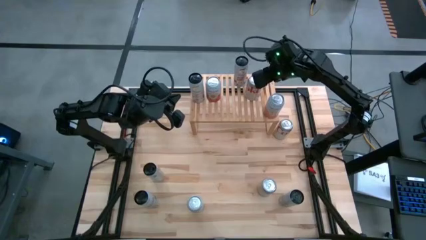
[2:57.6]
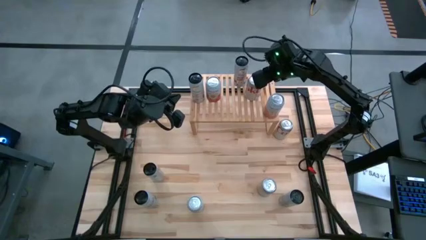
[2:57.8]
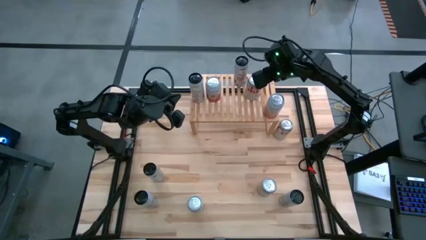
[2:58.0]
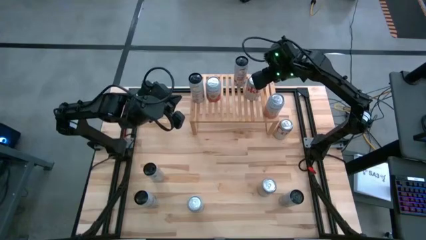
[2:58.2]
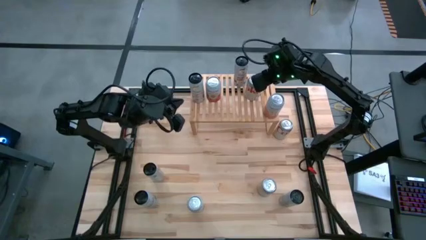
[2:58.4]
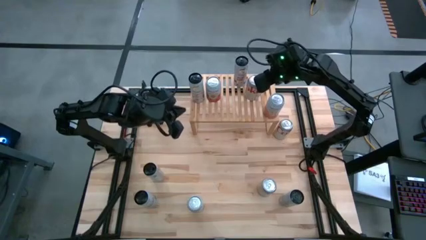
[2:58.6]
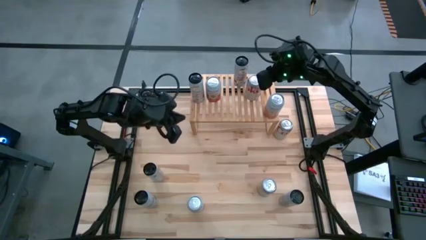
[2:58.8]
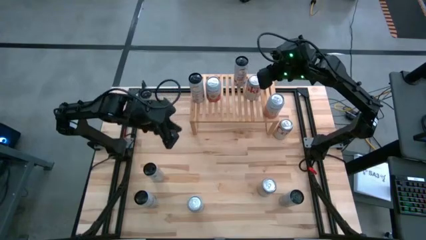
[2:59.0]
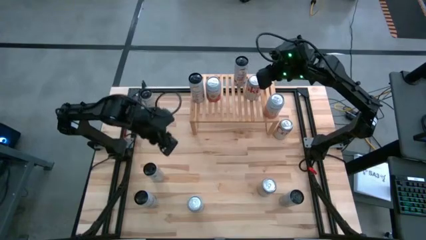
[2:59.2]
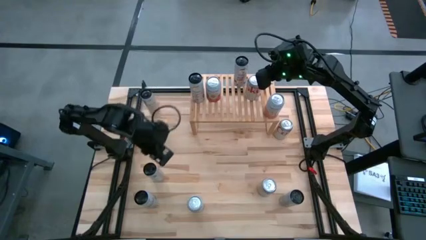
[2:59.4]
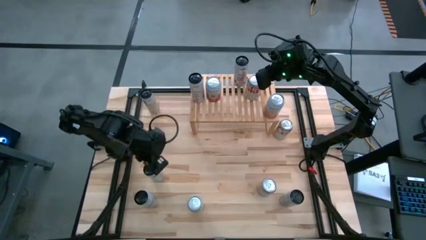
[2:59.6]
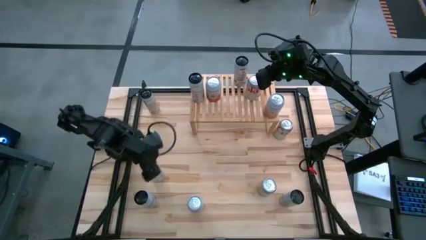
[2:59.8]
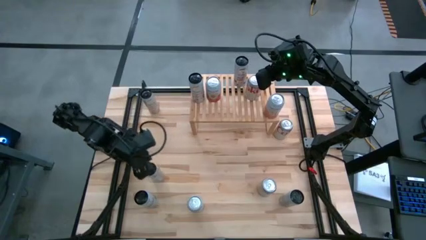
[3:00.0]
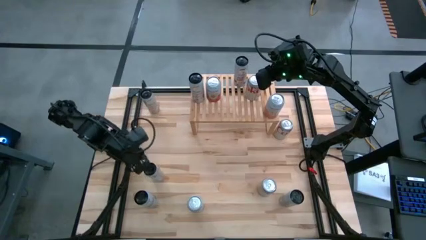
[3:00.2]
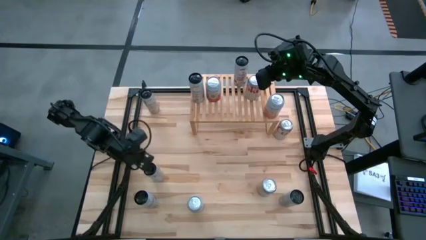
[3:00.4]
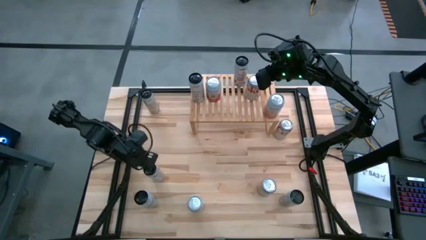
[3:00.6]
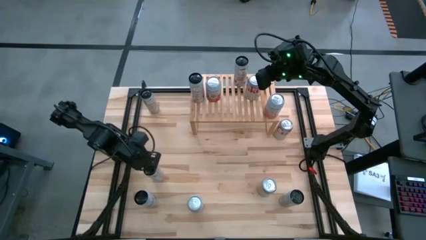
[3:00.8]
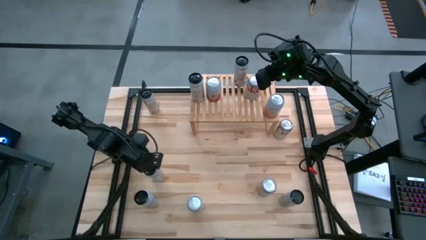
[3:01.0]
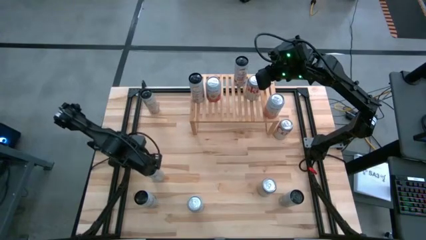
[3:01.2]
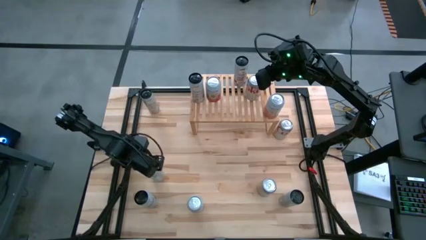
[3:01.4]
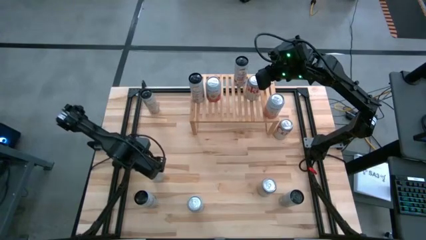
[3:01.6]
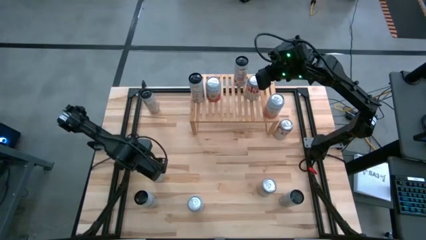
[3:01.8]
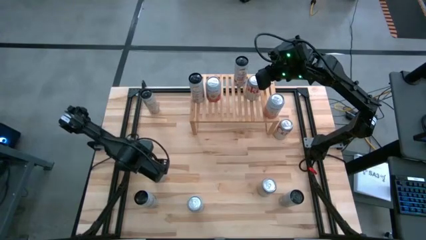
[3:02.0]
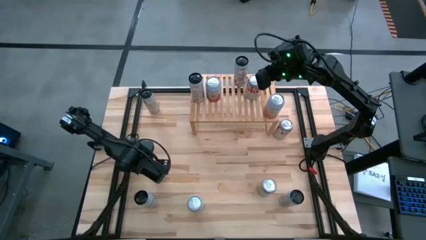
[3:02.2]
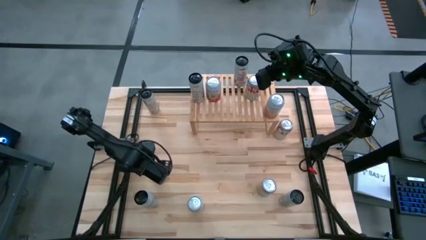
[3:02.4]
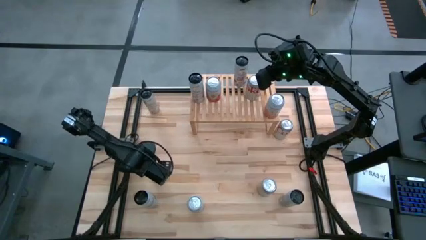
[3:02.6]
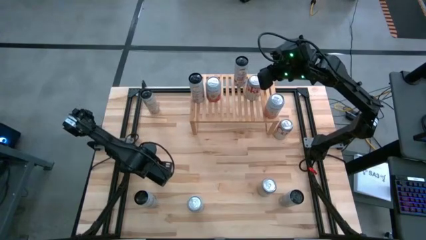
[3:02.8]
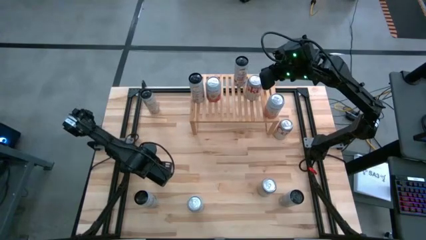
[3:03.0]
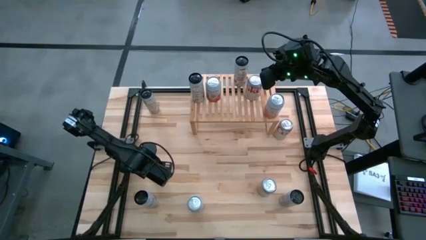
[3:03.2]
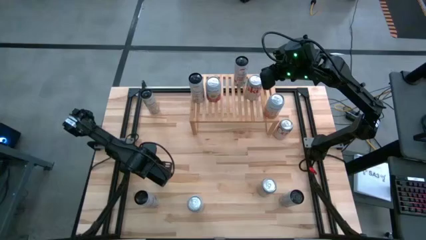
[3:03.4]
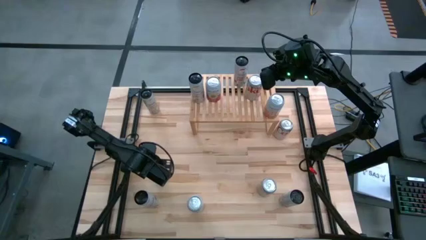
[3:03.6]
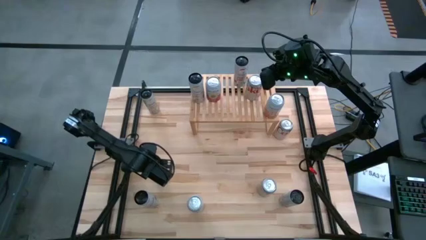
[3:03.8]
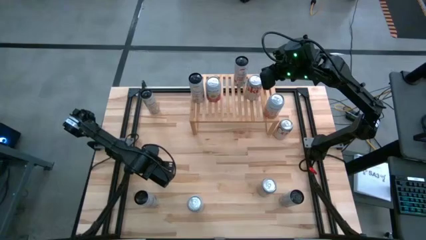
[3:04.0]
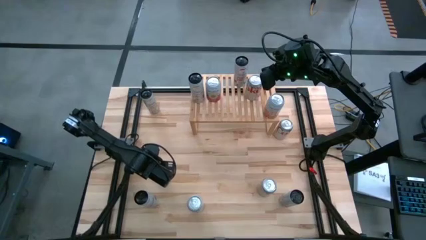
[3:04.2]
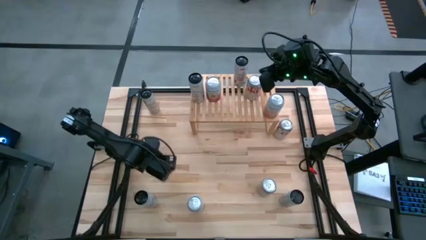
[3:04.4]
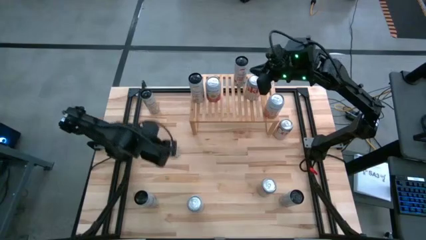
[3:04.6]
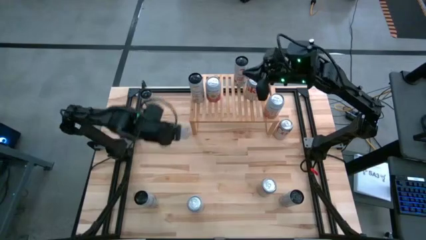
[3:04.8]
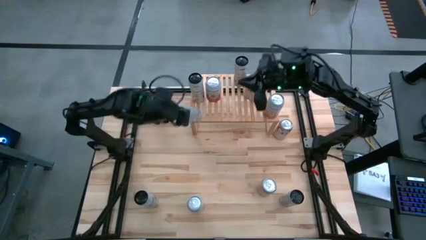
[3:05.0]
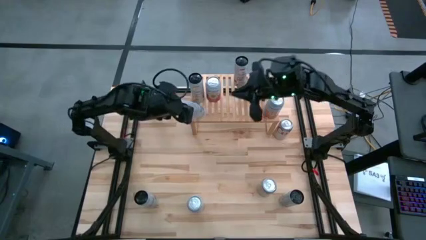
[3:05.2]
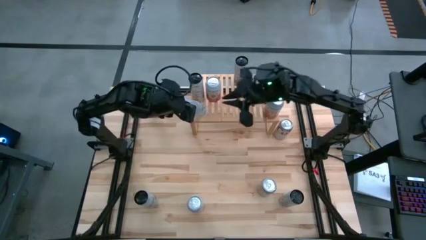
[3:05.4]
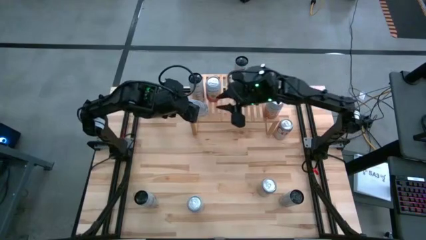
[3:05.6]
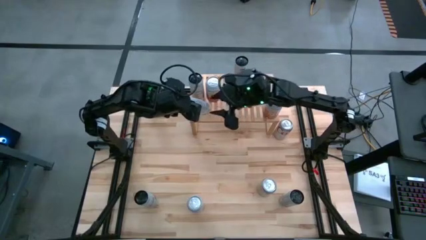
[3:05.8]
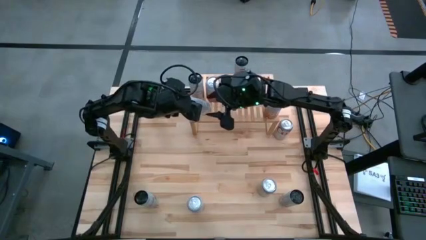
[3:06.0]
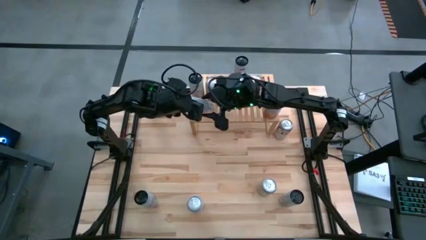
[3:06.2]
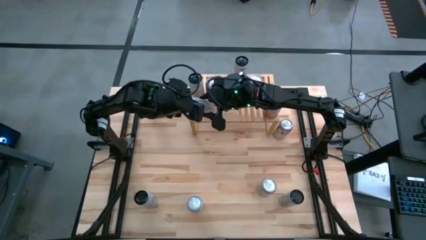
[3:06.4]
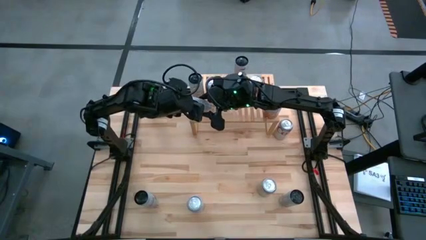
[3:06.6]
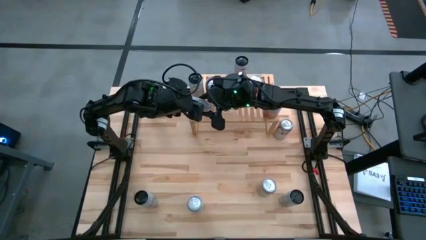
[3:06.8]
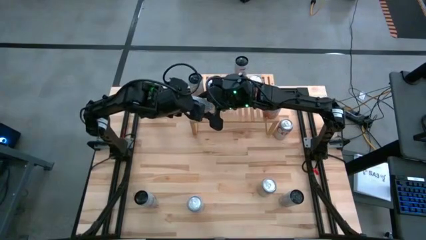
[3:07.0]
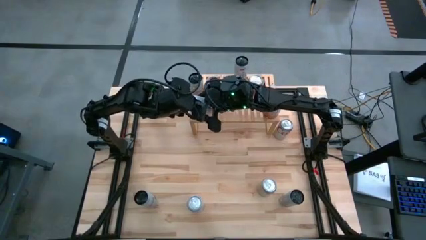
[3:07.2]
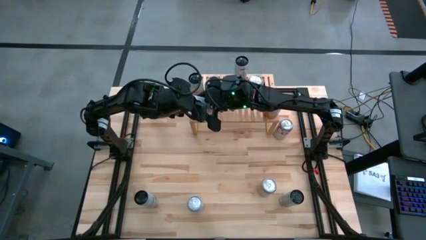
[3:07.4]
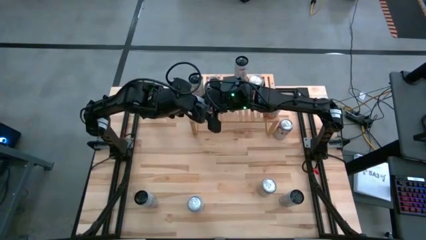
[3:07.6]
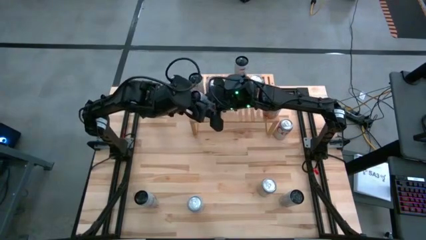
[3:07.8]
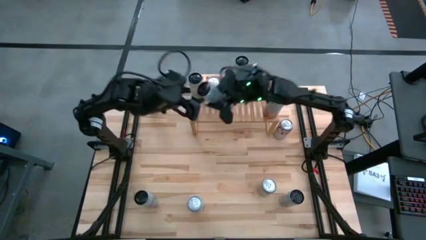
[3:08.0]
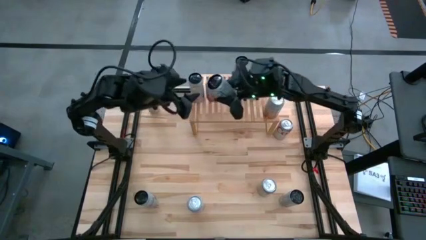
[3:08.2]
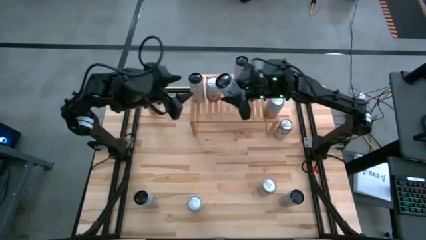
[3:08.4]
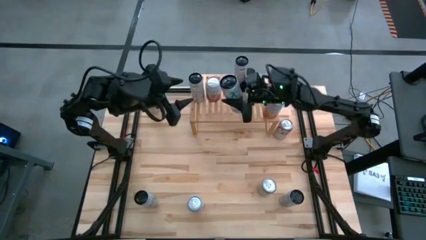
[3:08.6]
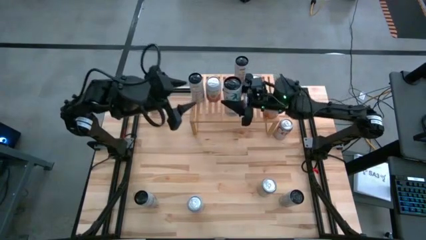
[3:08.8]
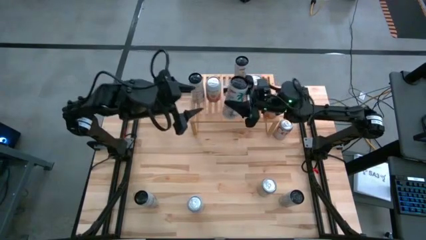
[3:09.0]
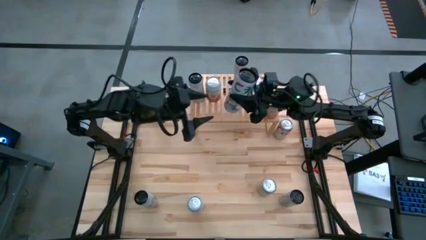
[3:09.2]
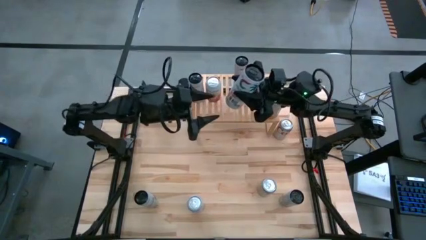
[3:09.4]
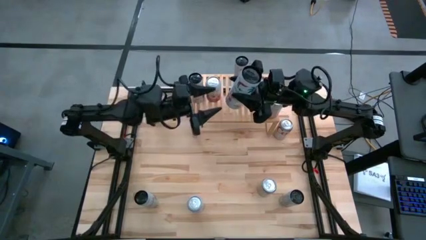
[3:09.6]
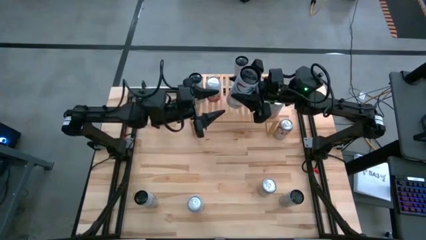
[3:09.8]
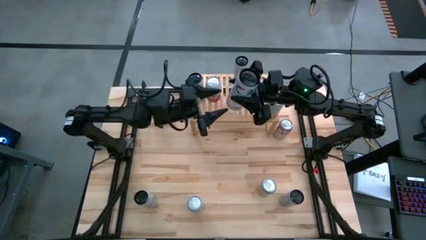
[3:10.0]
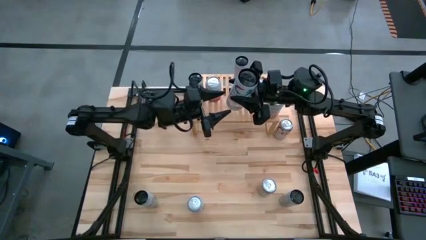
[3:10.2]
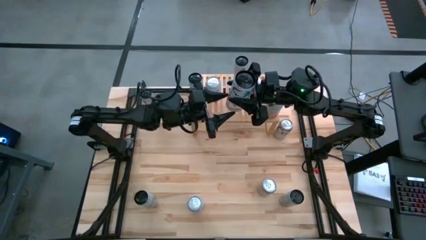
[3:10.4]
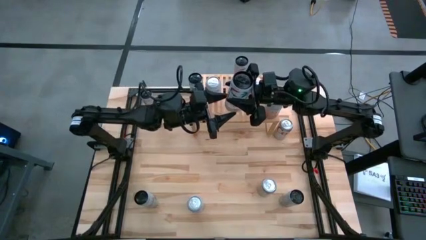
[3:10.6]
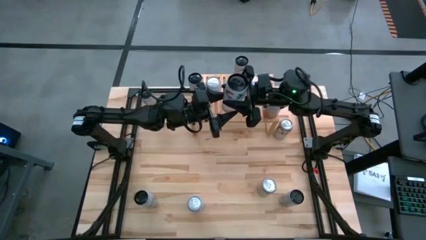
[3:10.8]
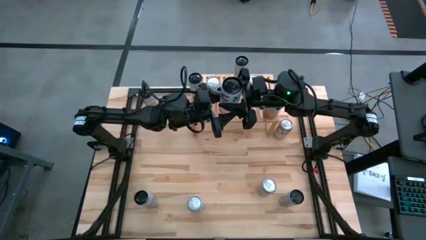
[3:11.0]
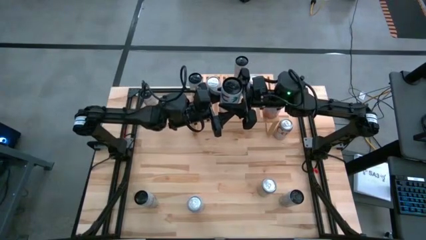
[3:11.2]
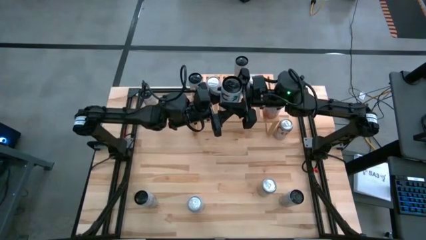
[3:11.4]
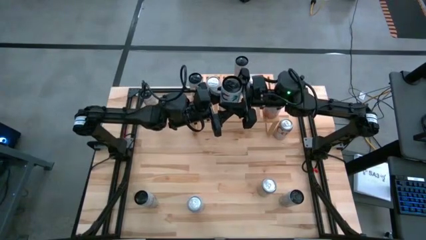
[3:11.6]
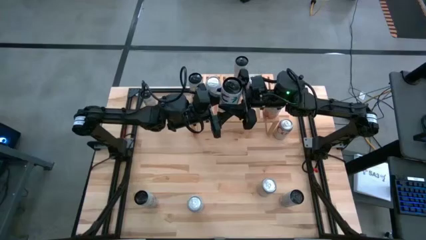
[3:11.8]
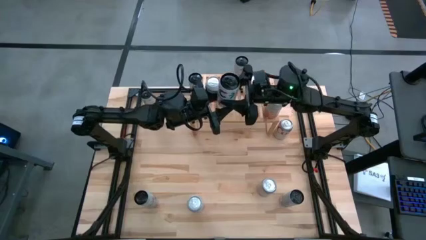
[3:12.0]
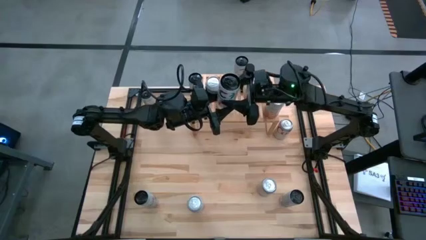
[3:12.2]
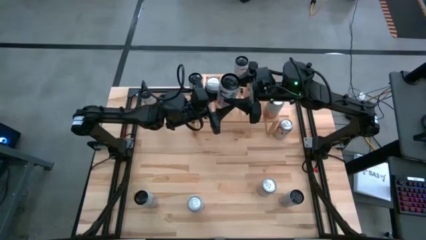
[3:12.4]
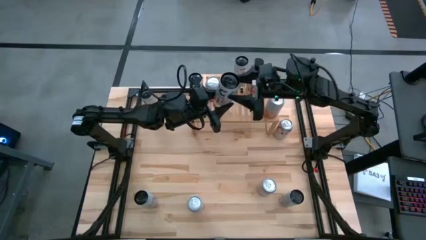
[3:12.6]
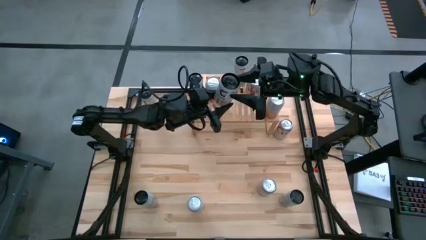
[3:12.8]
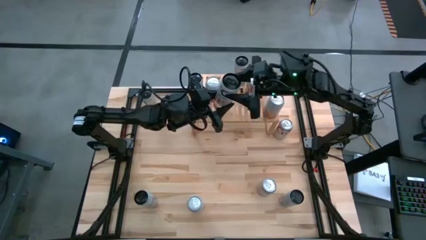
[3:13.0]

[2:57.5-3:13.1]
Task: Place canned beverage on shelf
Put the left white soda can on the shelf aligned with the other white soda can

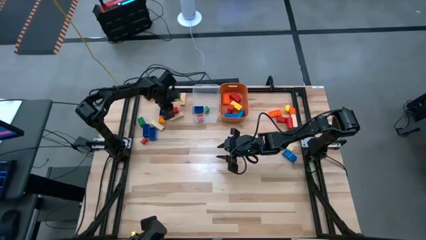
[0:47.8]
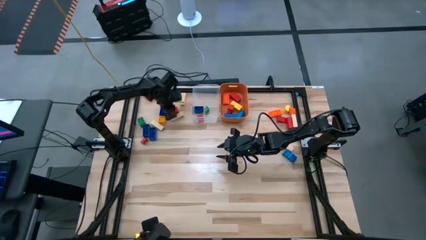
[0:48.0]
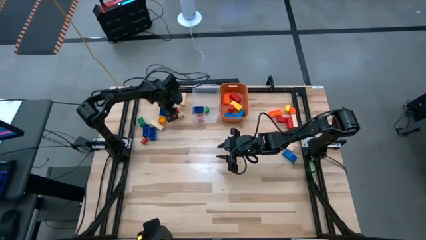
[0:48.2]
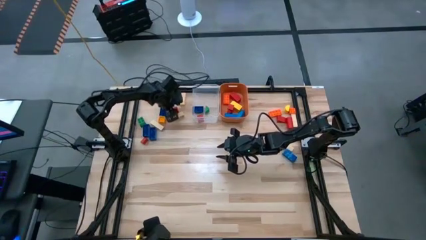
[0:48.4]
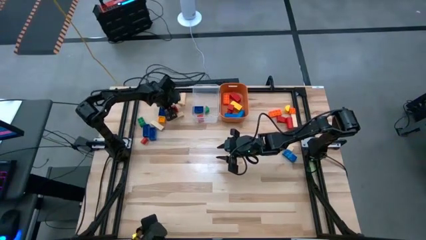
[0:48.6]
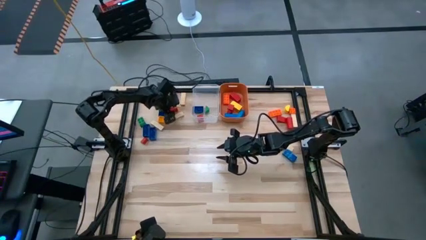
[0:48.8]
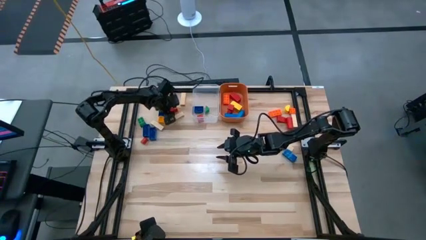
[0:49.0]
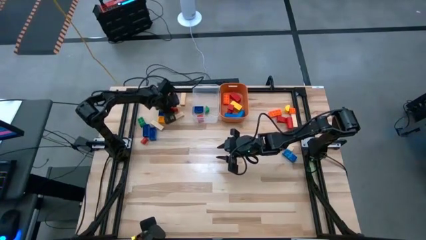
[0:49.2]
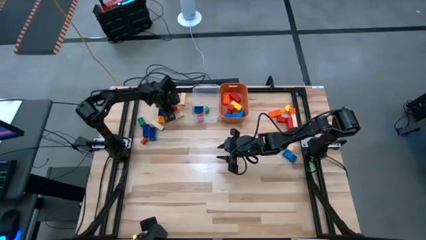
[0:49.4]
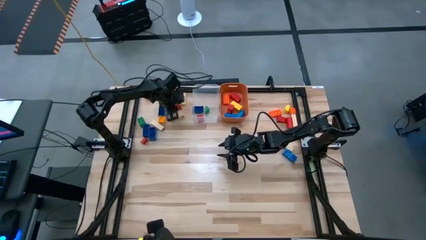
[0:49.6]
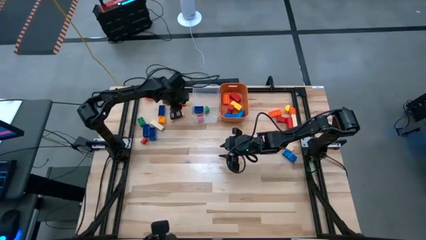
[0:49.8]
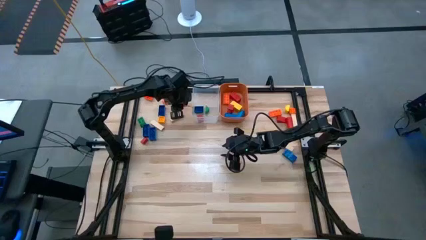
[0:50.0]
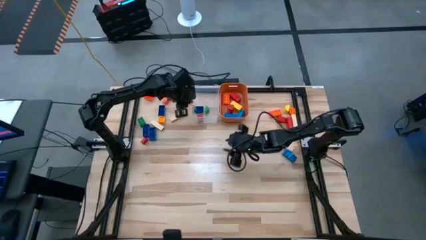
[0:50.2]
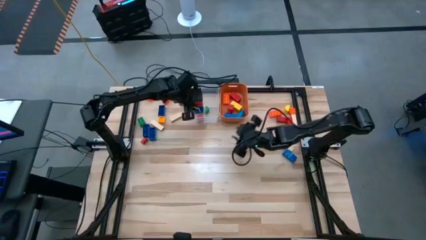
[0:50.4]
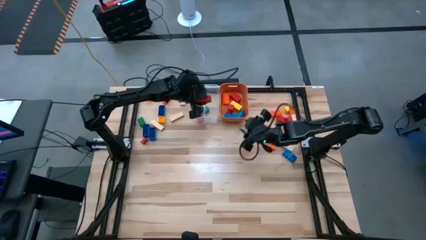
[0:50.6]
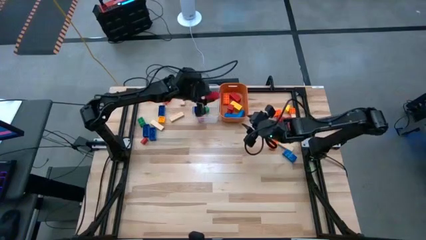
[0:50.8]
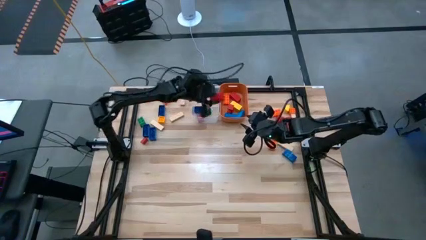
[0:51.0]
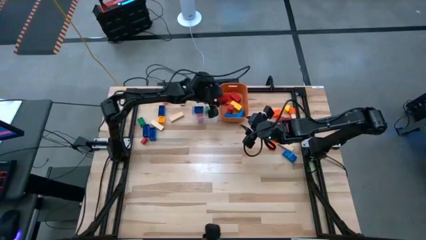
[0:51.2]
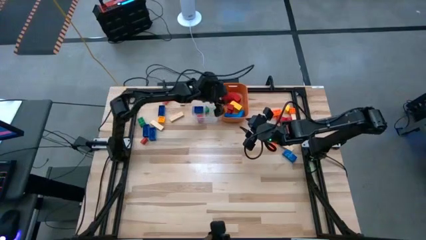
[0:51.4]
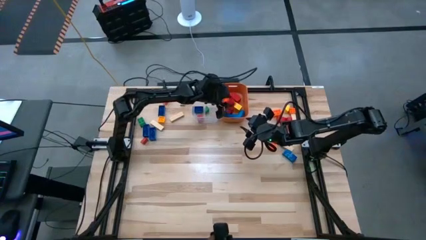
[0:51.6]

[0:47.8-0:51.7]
Task: Sort blocks by size
Put the red rectangle block into the orange bin
